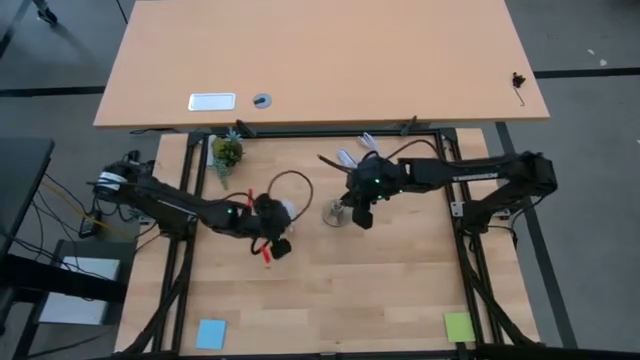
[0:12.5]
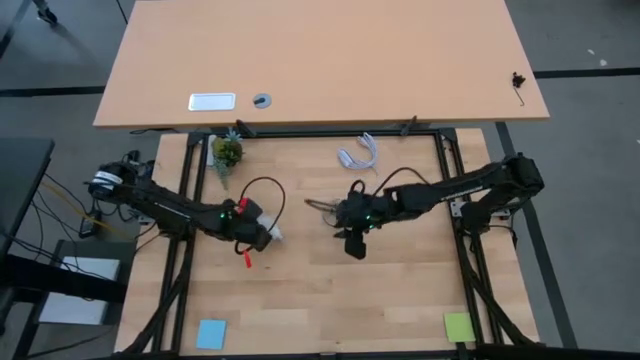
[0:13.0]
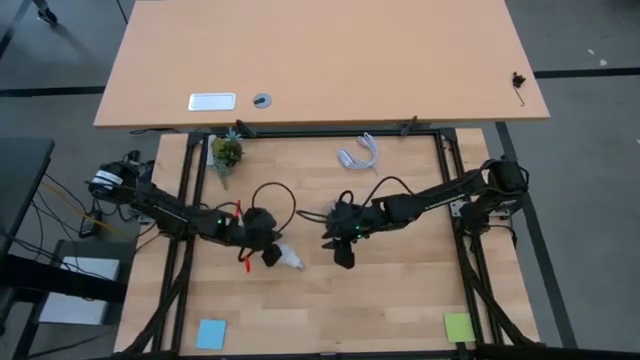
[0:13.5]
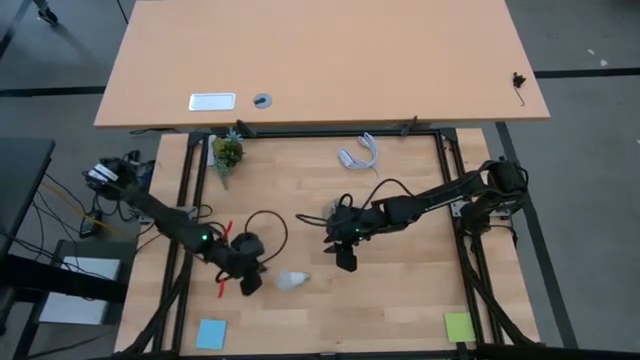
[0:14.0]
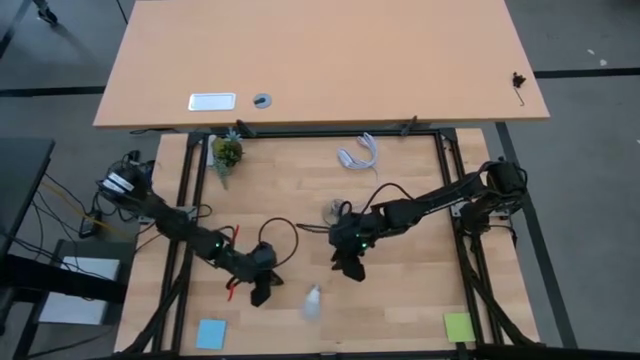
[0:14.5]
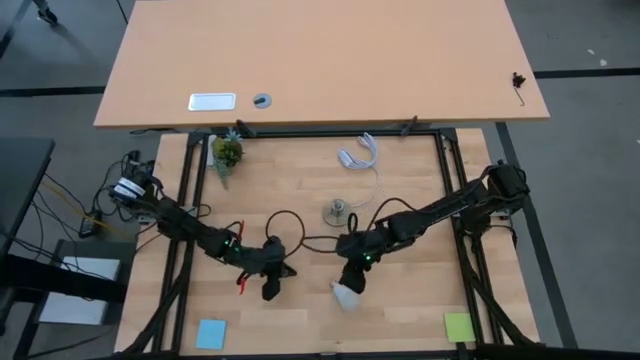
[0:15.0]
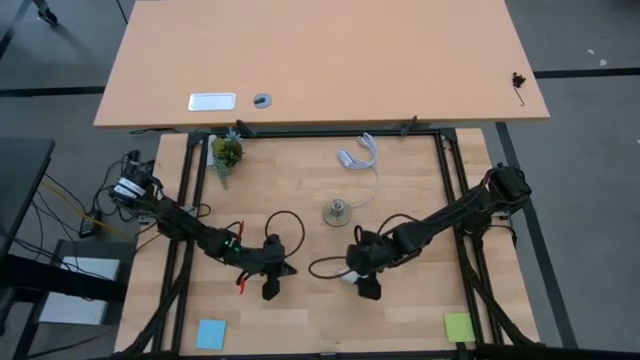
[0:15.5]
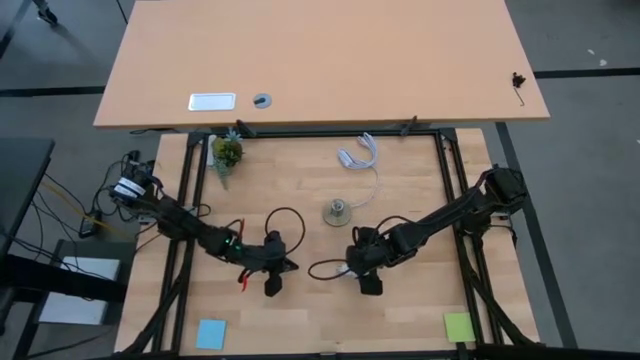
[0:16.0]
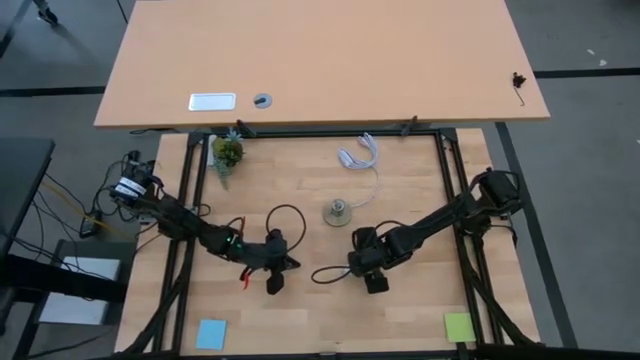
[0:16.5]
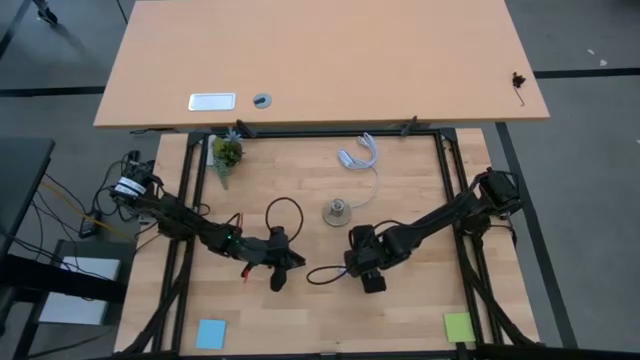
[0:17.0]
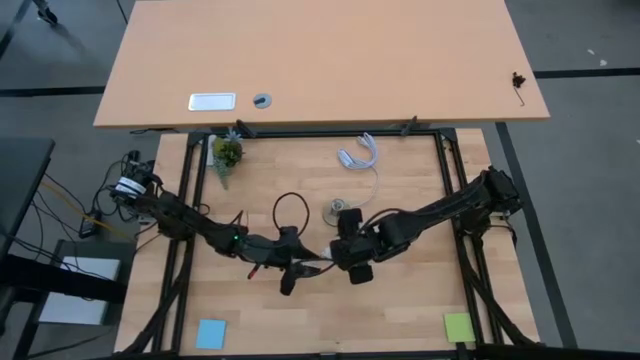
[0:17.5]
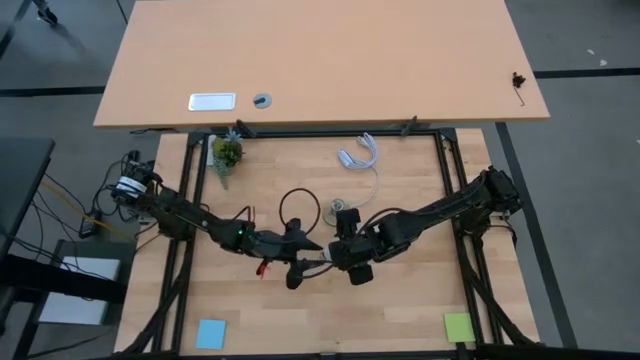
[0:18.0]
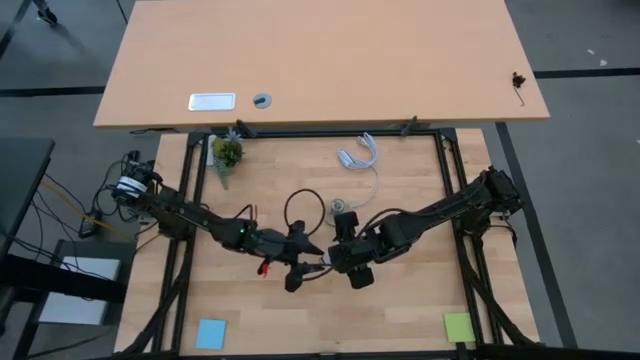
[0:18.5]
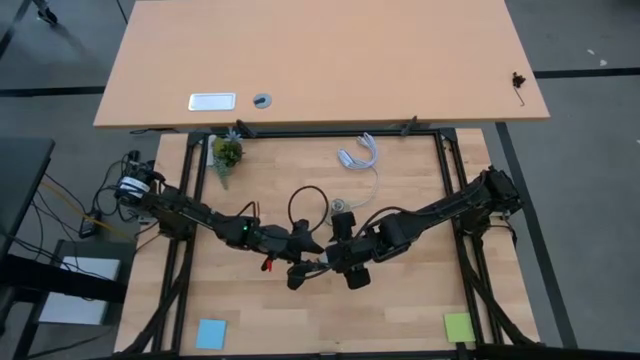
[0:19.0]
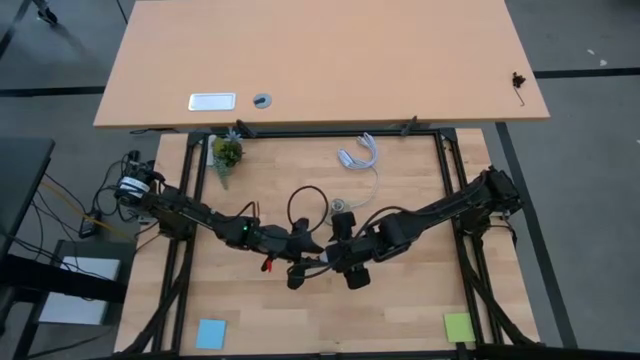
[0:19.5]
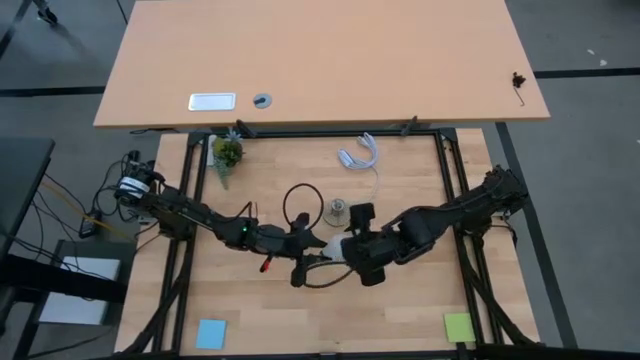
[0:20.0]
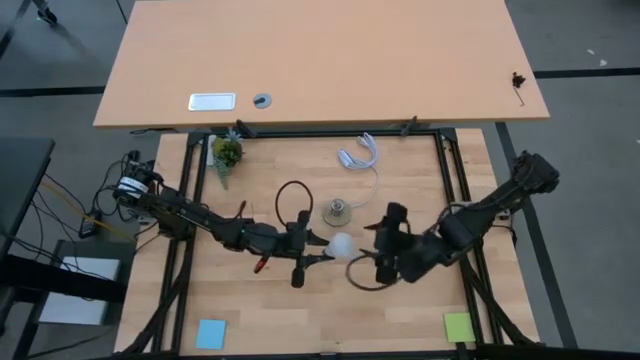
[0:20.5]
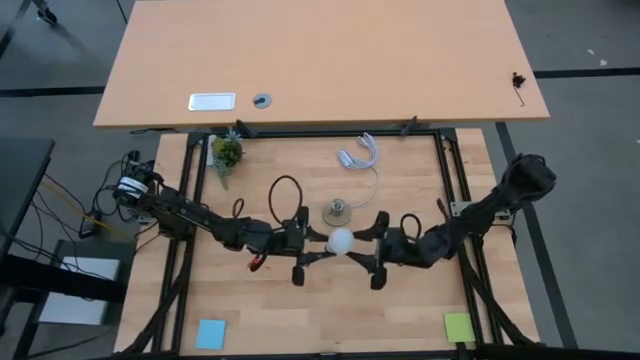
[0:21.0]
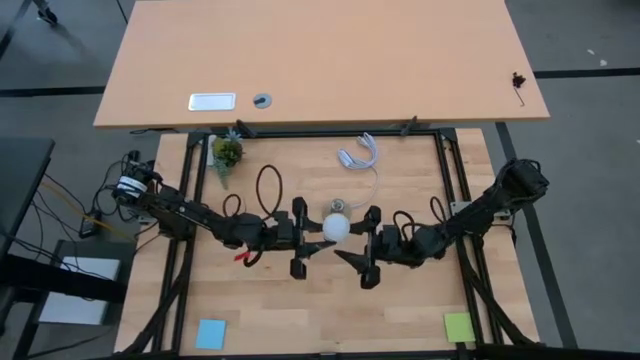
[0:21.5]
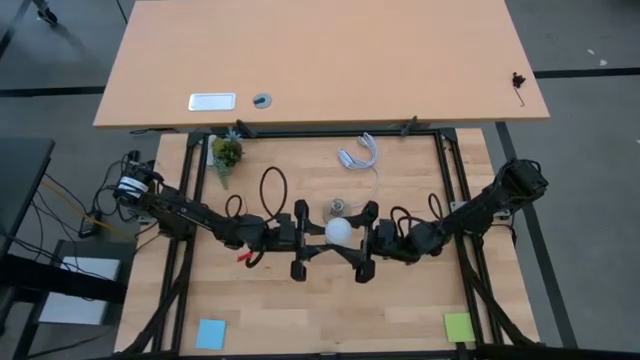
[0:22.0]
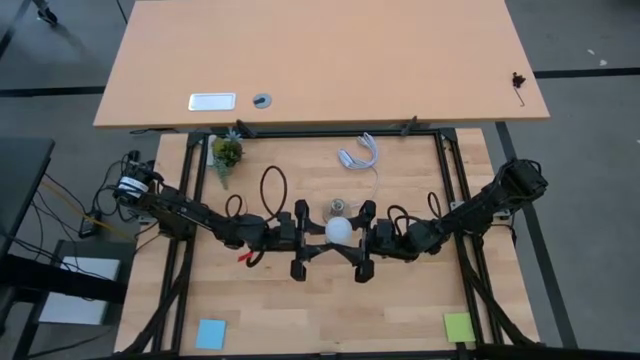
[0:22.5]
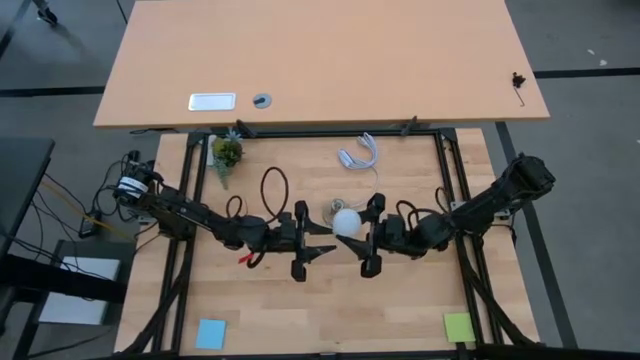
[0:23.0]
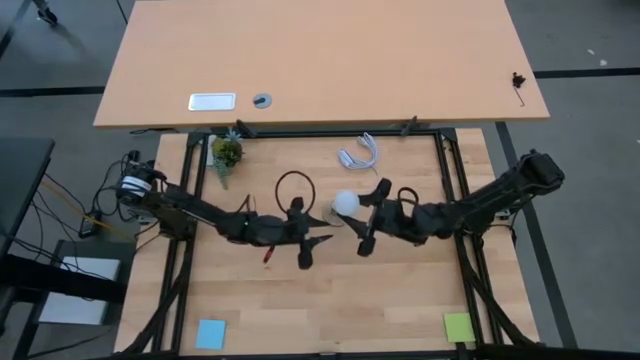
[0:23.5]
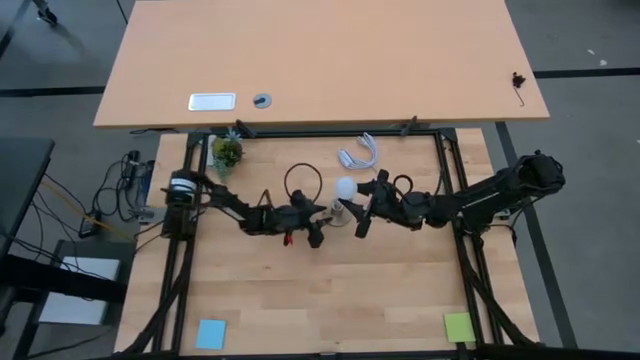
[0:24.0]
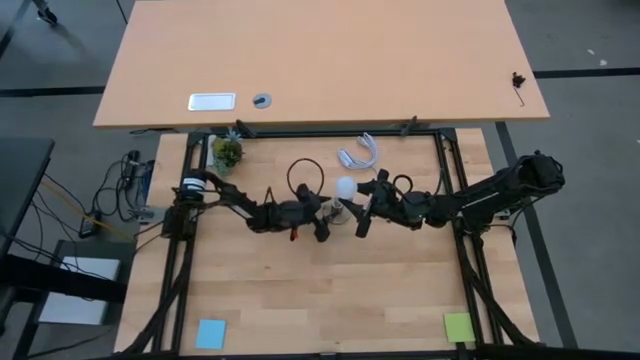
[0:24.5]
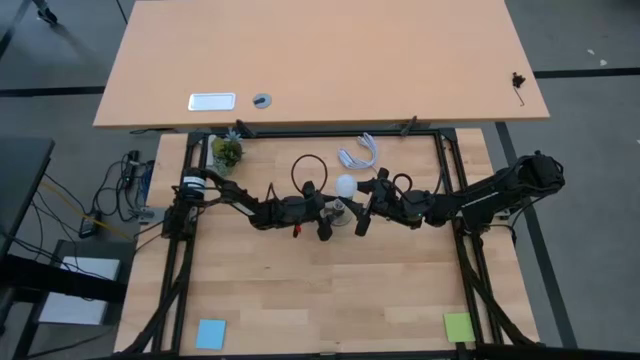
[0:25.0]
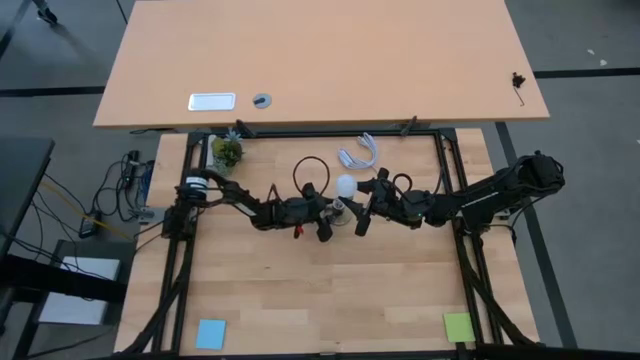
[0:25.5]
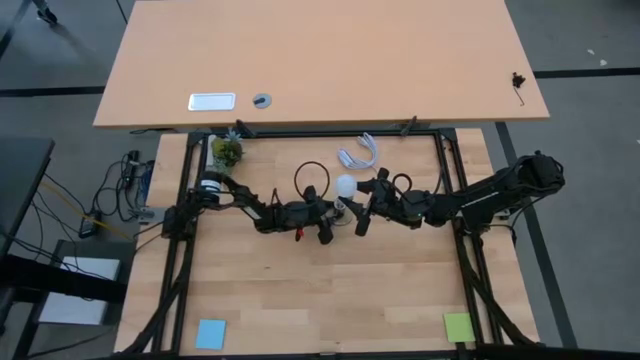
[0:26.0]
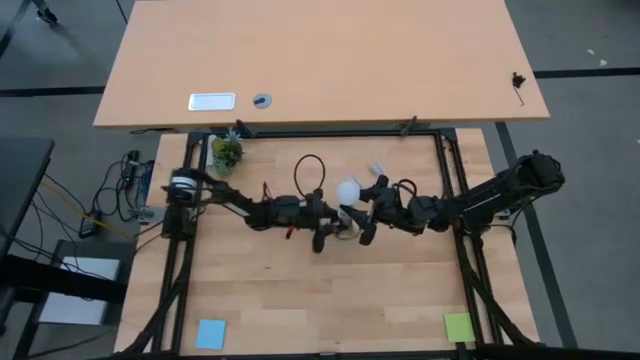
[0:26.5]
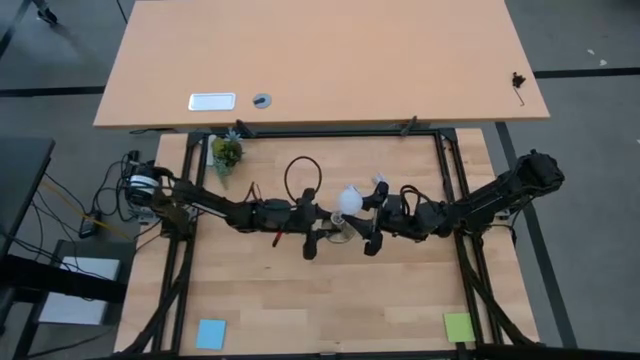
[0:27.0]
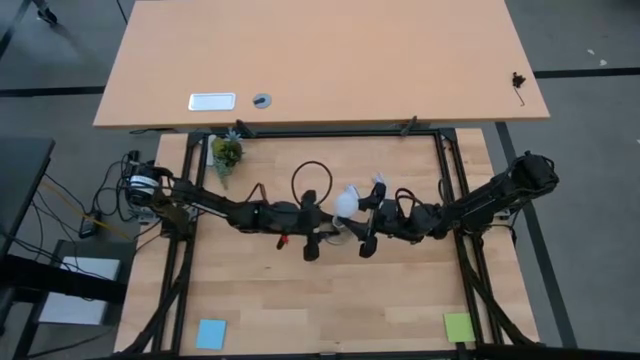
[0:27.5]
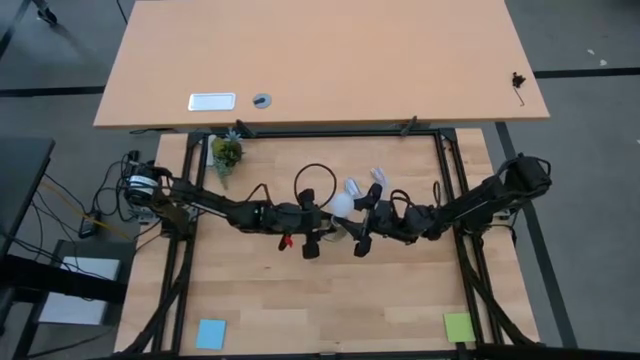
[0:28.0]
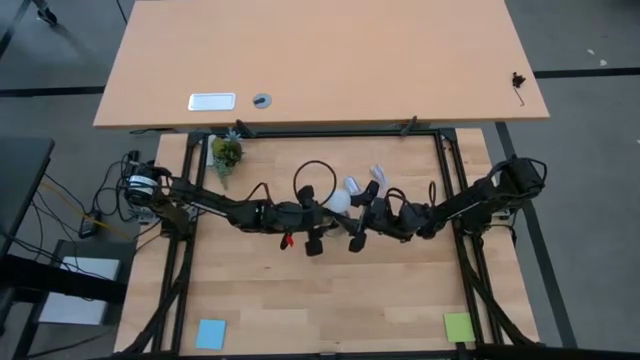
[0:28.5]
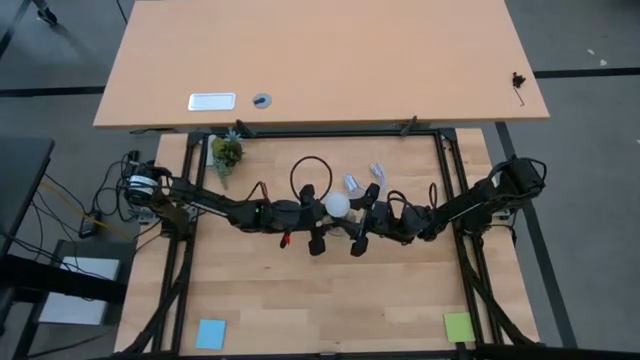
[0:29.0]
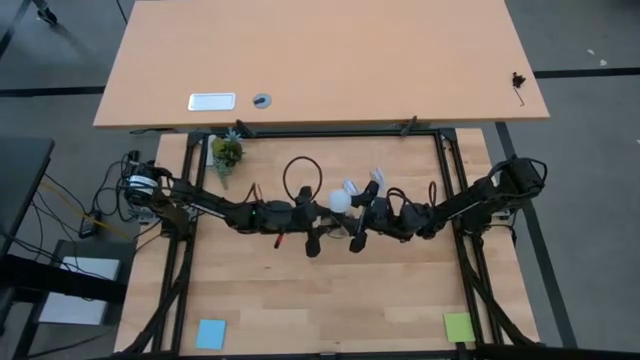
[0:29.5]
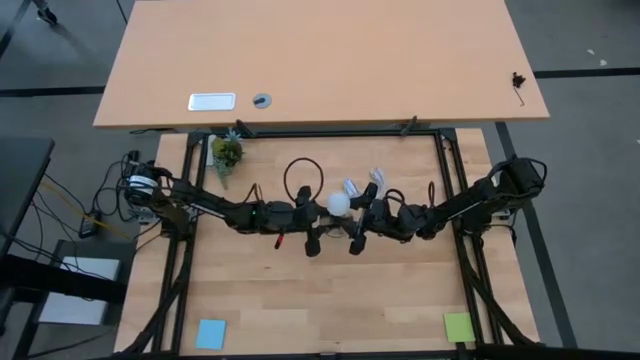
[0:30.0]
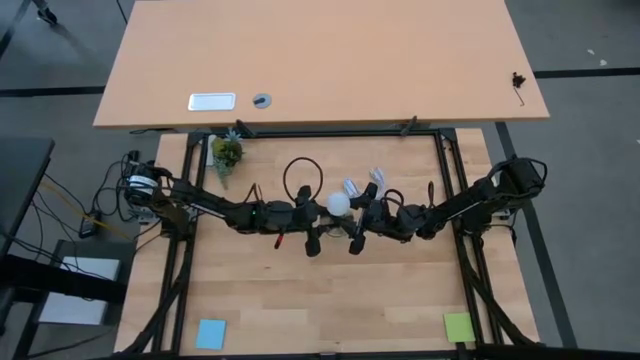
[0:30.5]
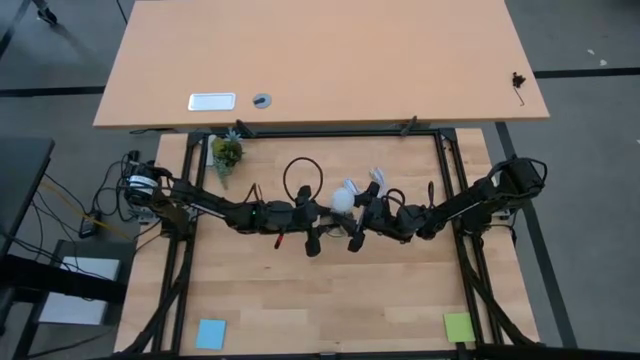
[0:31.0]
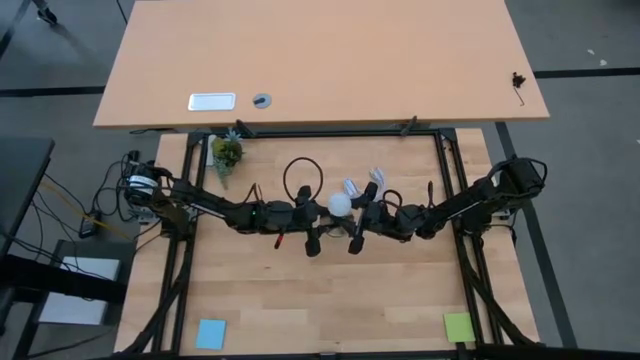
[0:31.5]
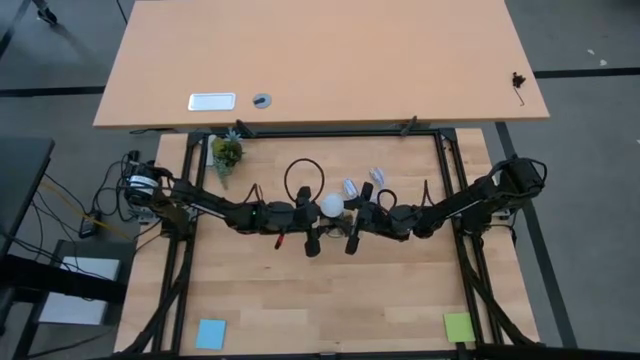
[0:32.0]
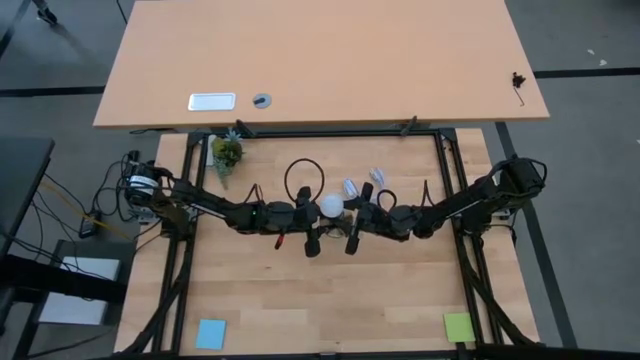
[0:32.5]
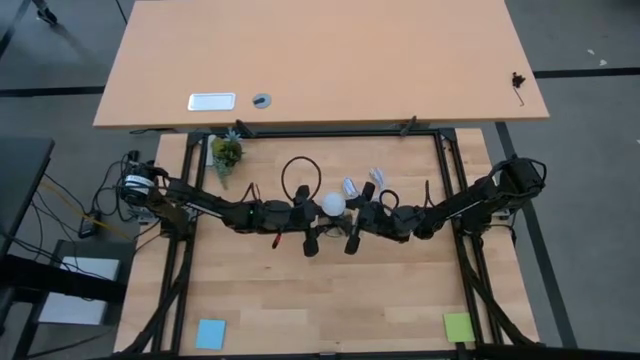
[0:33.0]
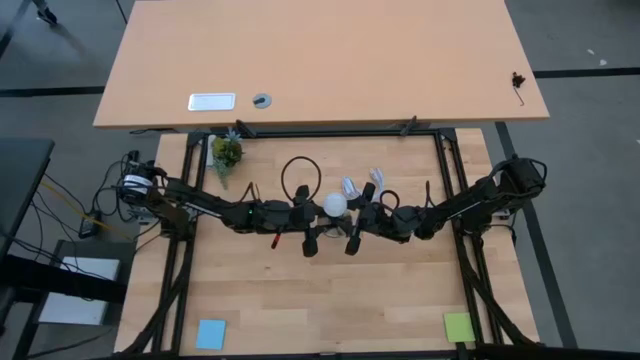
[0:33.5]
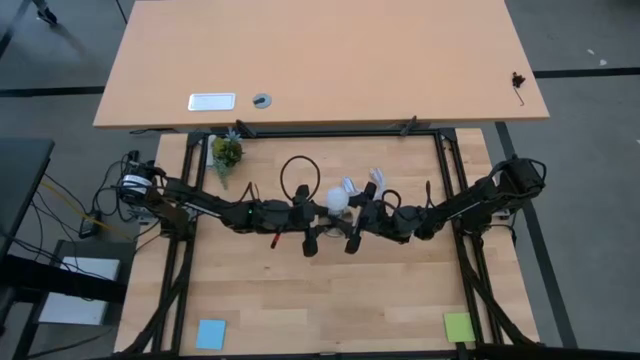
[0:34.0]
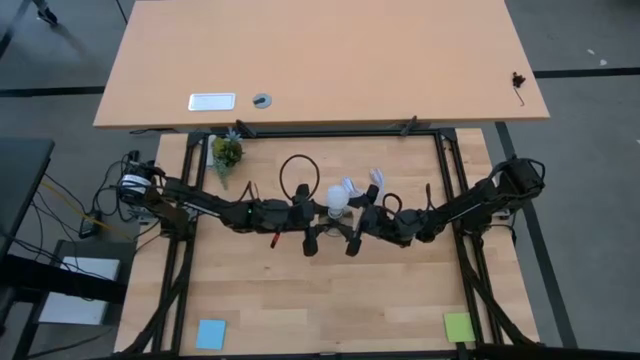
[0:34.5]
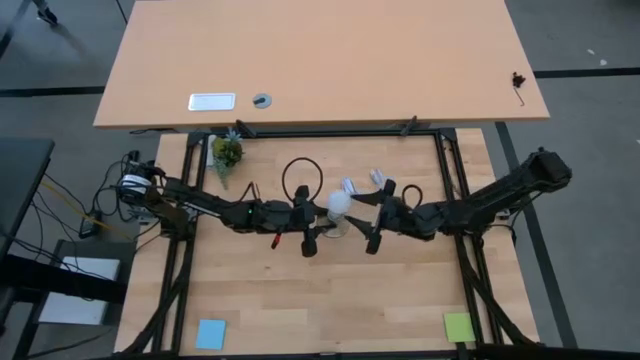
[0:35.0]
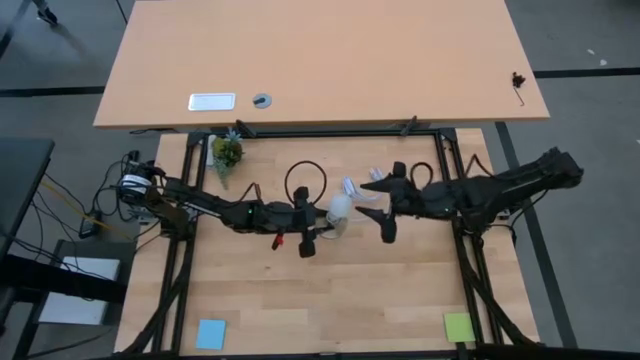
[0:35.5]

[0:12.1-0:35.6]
Task: Screw lightbulb
Insert the lightbulb into the lamp socket
